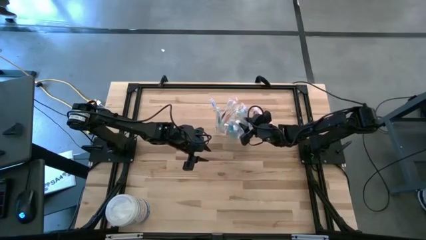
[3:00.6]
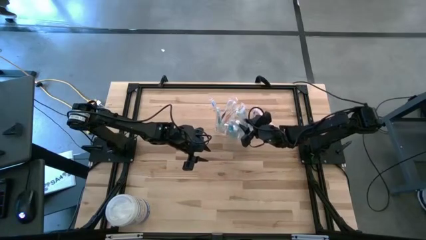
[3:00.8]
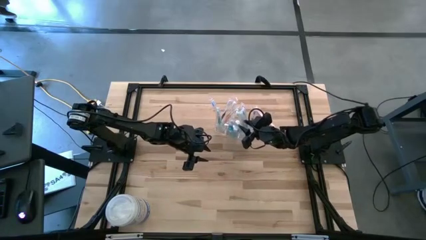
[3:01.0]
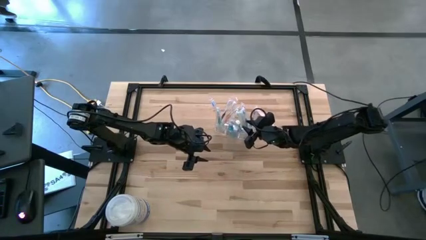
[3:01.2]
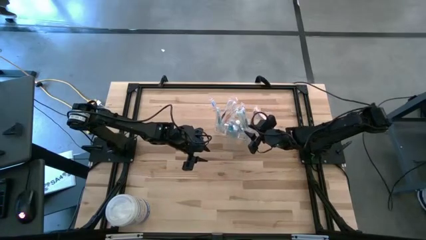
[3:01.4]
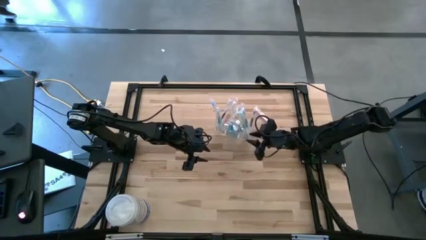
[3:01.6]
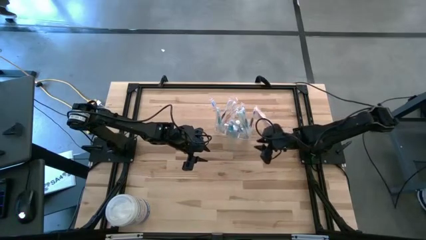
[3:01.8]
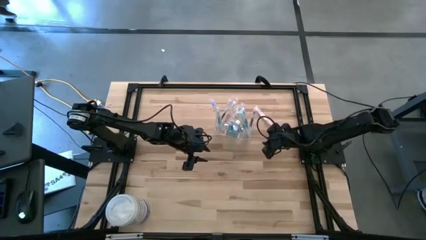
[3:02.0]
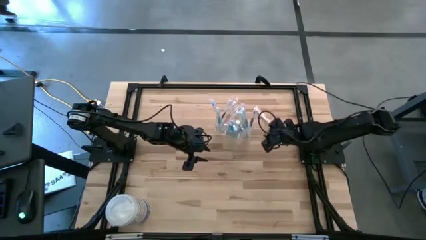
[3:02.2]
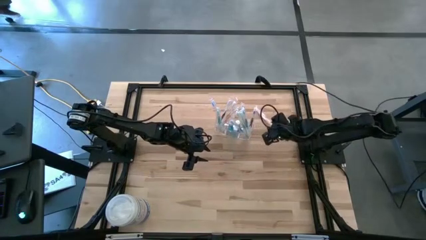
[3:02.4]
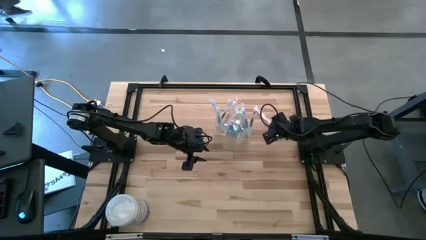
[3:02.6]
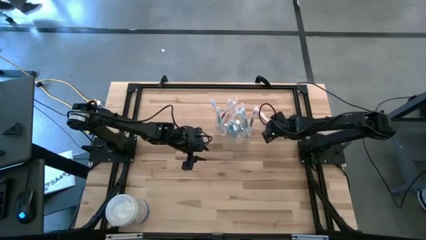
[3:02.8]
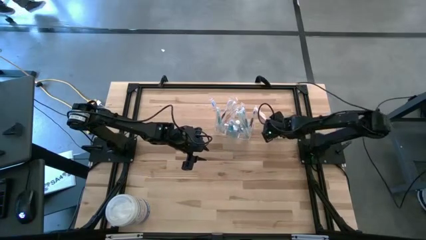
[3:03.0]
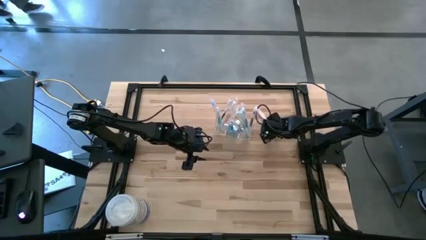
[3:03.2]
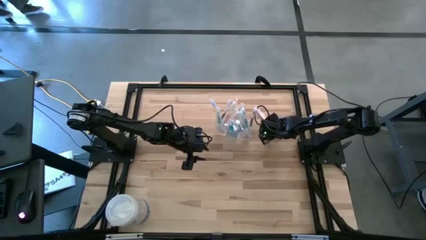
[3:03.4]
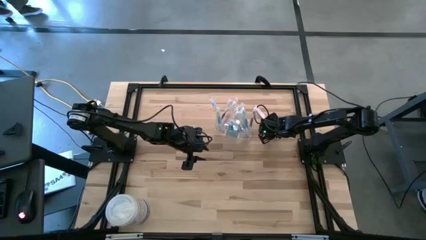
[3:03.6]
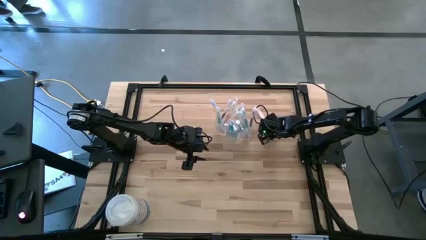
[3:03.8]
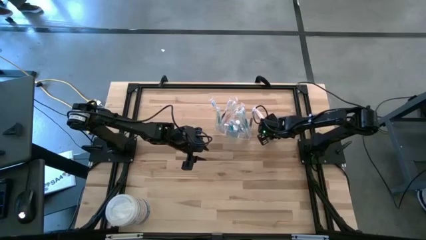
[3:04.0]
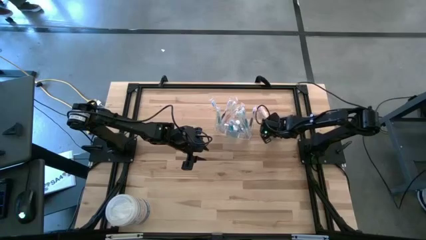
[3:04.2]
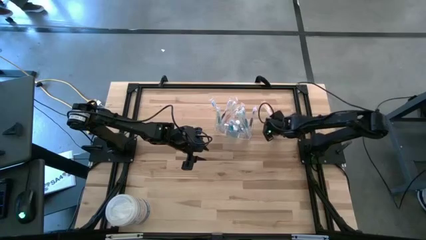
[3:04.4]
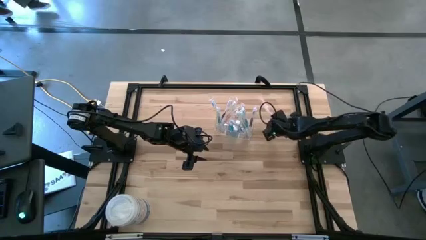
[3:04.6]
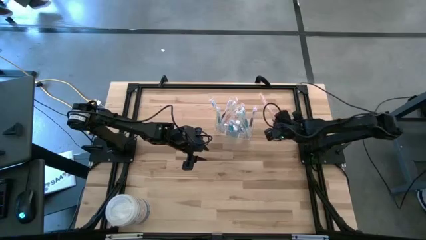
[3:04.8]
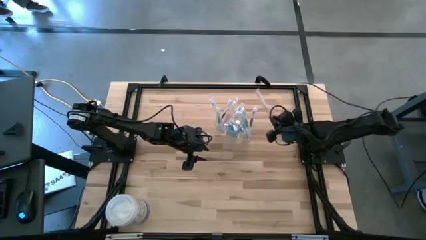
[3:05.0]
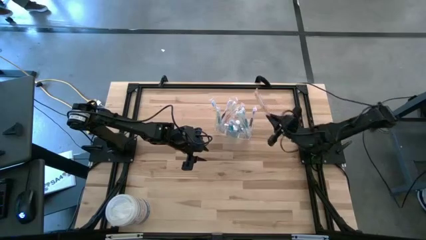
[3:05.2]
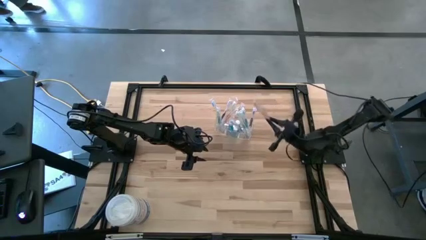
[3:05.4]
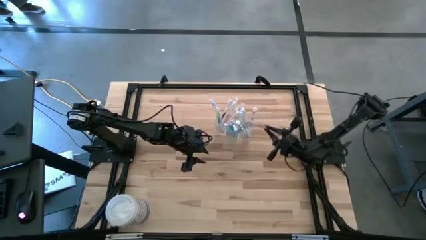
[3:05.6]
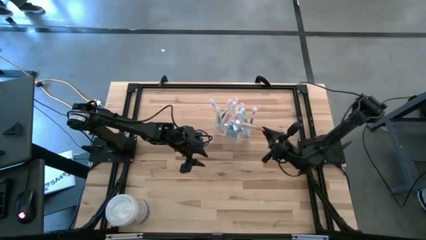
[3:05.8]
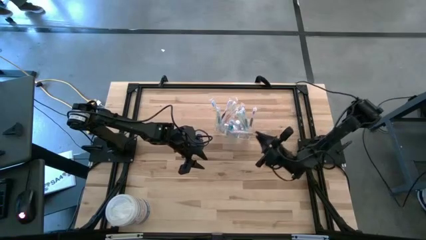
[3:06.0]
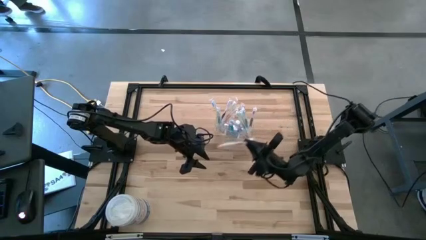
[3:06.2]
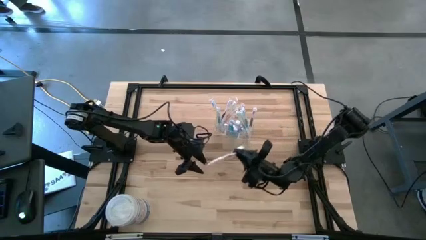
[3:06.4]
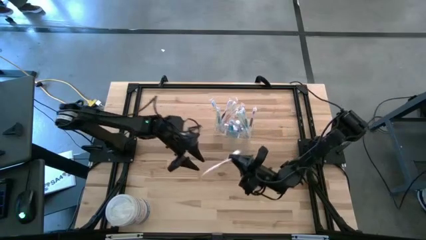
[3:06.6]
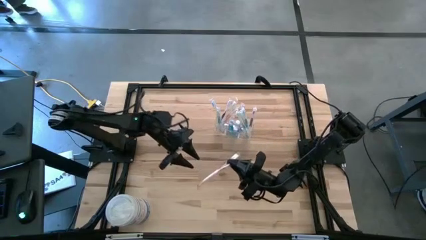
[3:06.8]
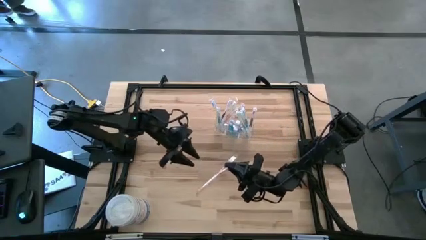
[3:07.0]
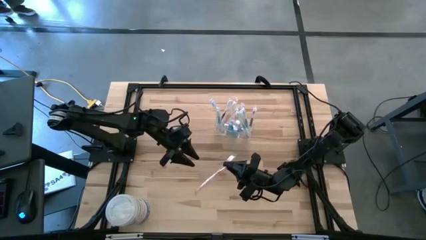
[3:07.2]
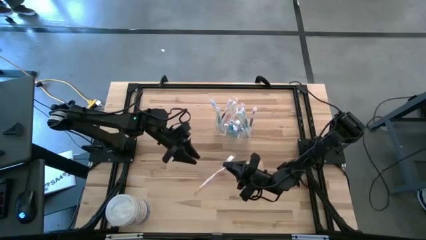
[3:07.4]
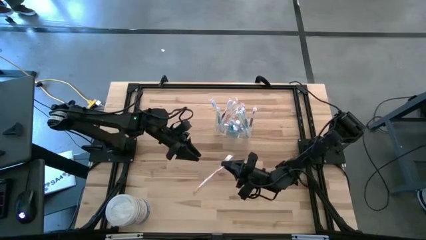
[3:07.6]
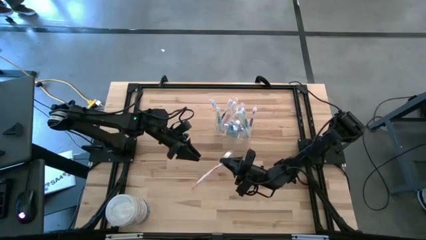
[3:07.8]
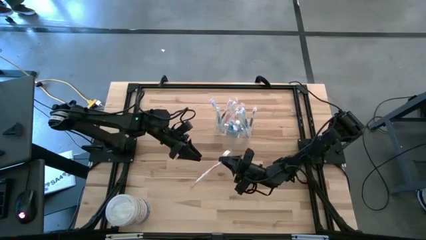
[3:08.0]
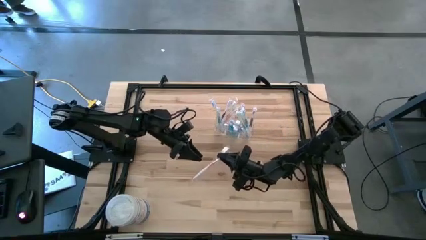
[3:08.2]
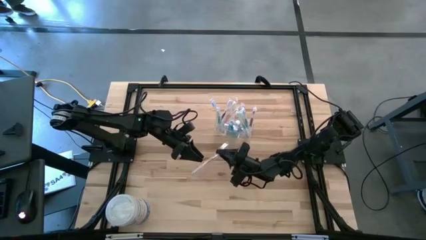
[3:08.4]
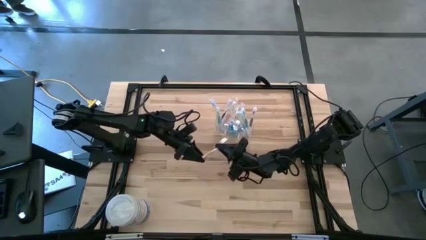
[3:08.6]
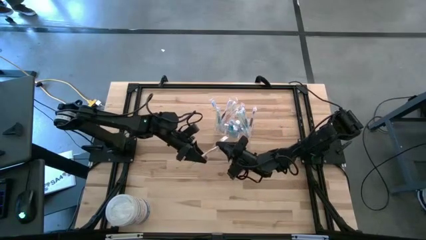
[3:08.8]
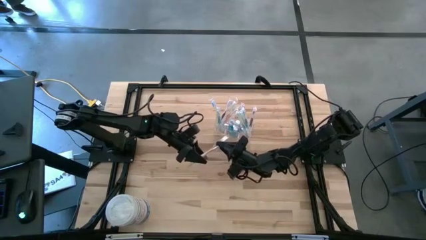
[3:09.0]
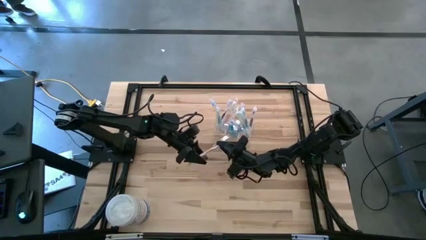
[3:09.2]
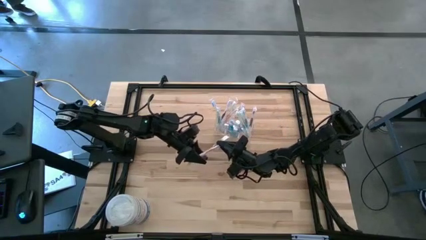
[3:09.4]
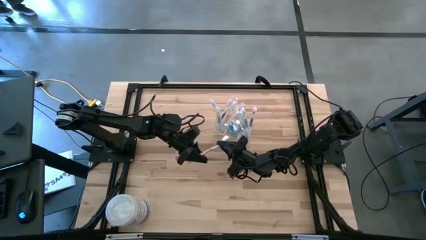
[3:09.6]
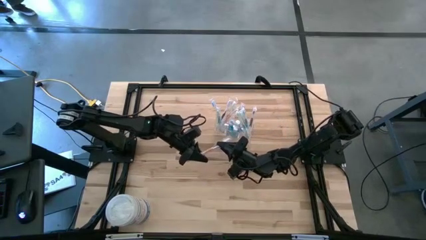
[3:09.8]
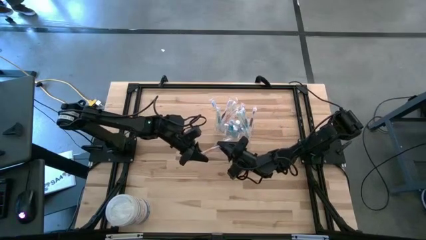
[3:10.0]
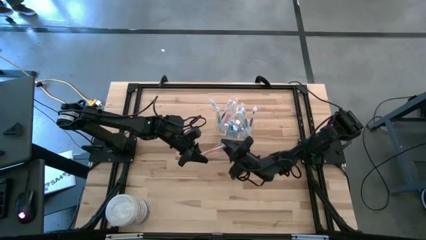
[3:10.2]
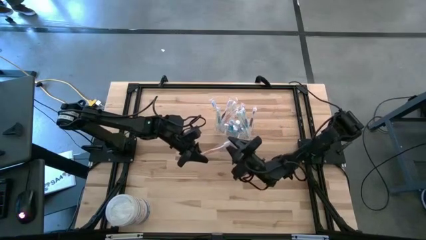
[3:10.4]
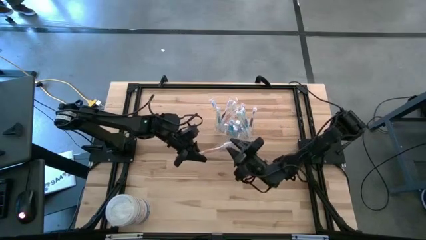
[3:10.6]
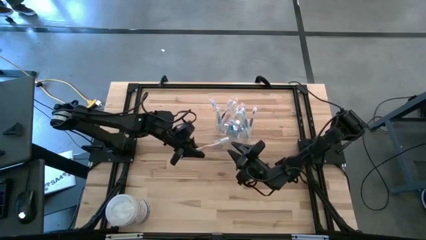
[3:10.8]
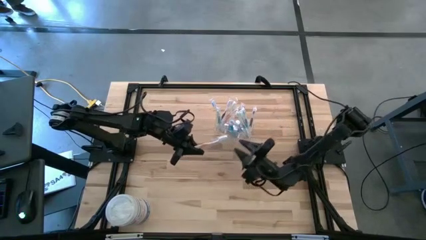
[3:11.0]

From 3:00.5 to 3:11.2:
Task: Pick & Place toothbrushing station
Put the orange toothbrush into the transparent organizer

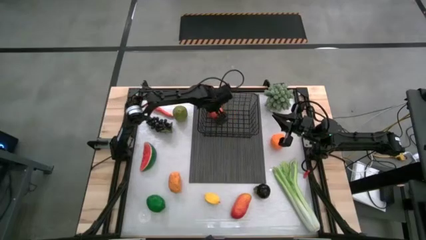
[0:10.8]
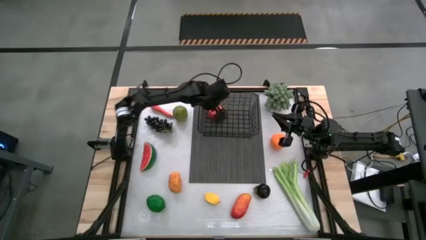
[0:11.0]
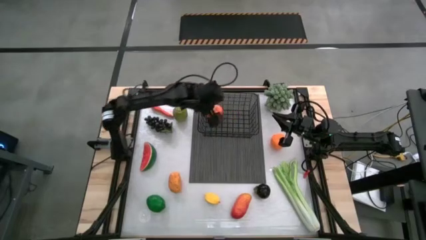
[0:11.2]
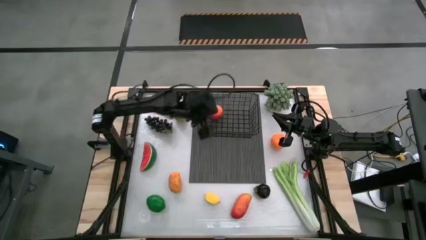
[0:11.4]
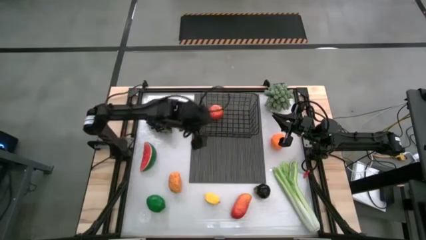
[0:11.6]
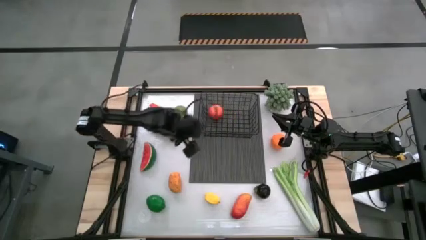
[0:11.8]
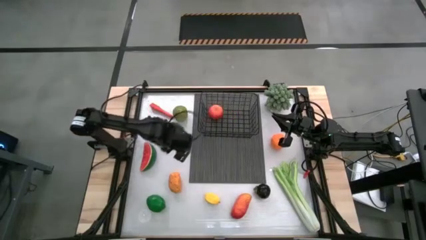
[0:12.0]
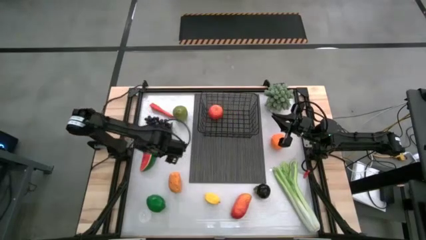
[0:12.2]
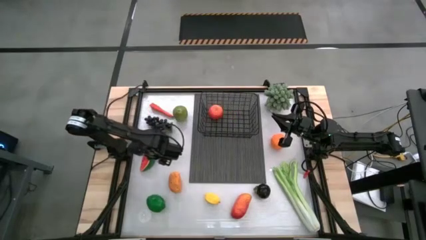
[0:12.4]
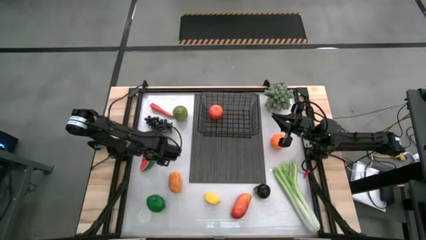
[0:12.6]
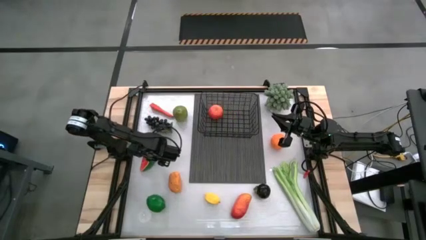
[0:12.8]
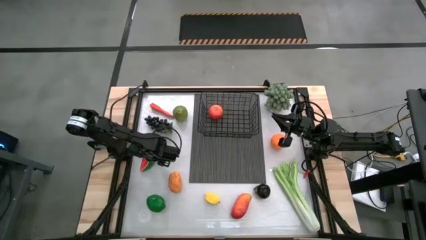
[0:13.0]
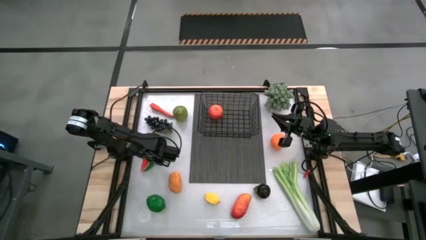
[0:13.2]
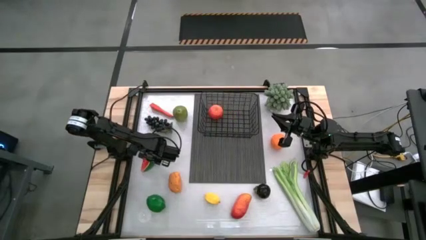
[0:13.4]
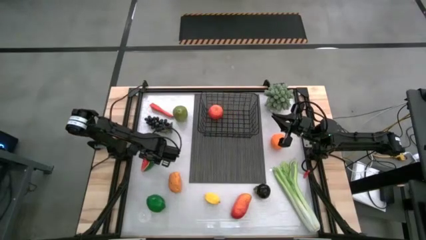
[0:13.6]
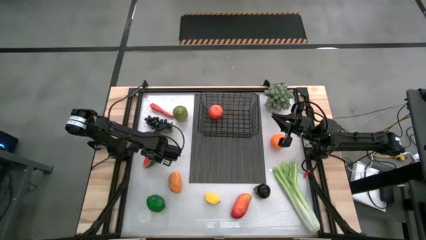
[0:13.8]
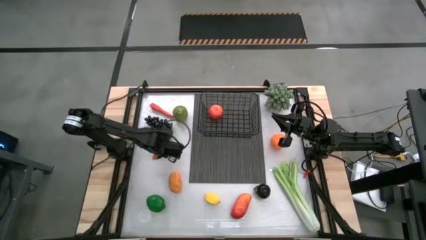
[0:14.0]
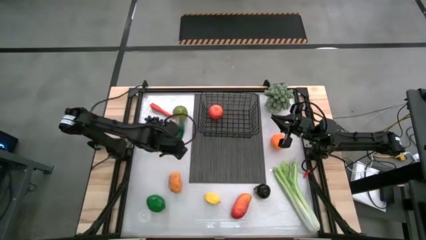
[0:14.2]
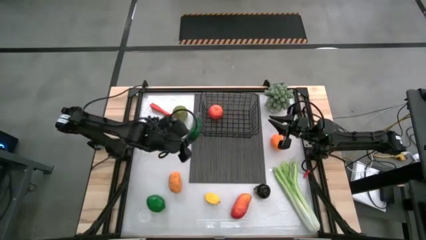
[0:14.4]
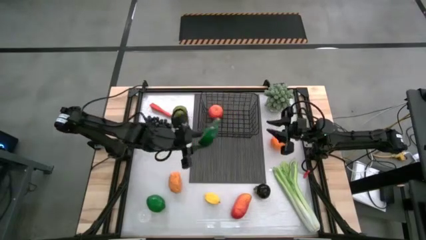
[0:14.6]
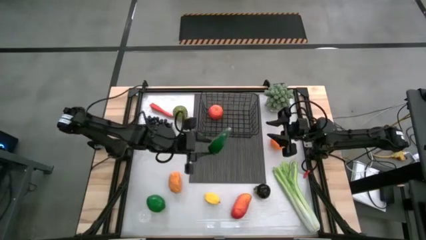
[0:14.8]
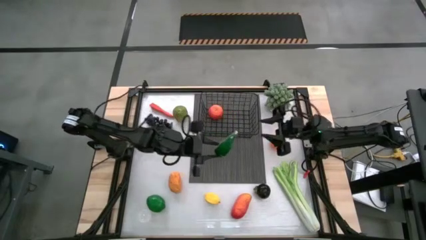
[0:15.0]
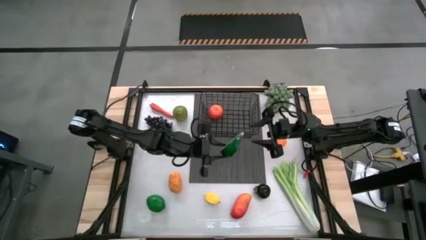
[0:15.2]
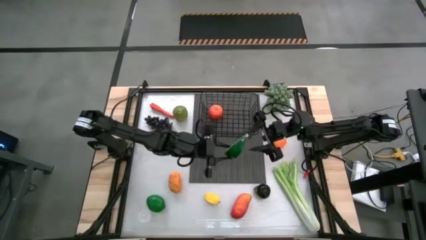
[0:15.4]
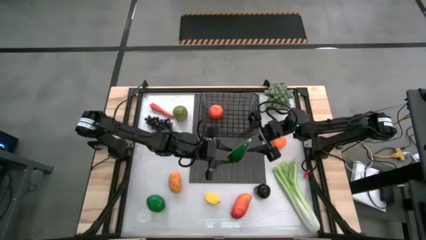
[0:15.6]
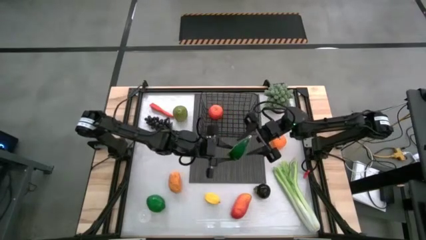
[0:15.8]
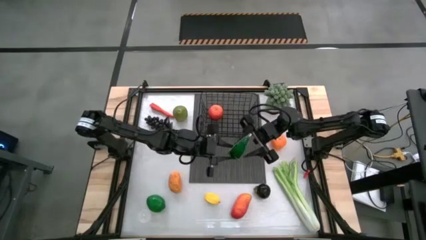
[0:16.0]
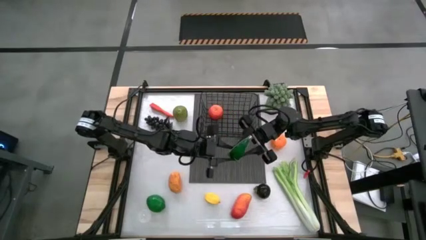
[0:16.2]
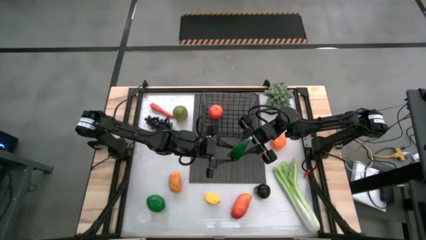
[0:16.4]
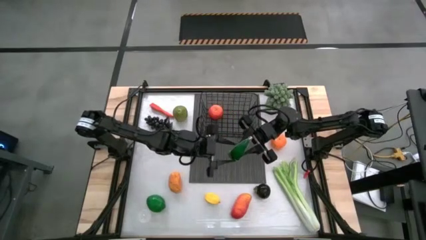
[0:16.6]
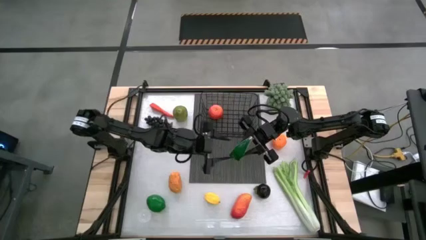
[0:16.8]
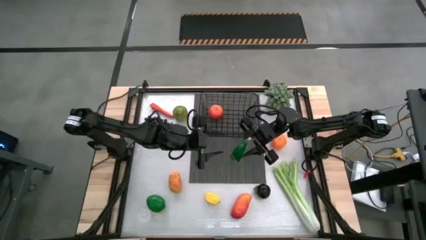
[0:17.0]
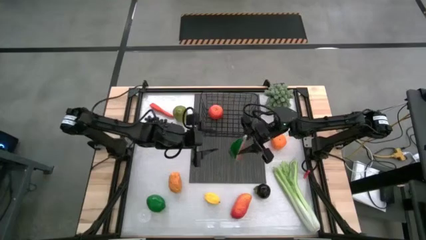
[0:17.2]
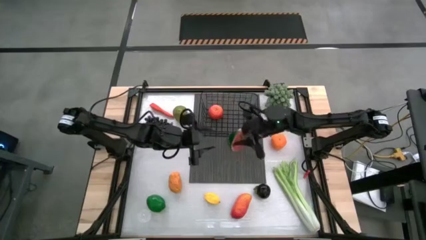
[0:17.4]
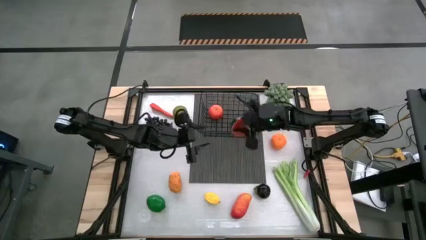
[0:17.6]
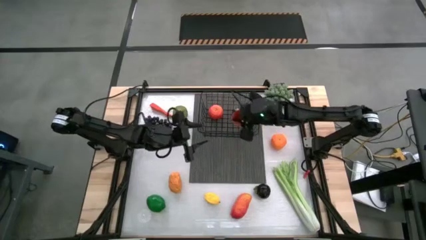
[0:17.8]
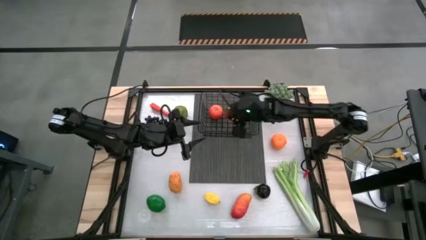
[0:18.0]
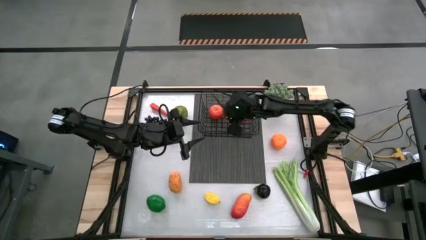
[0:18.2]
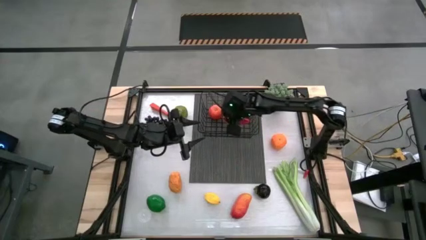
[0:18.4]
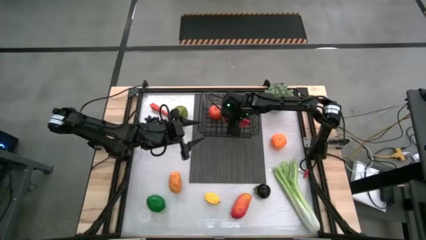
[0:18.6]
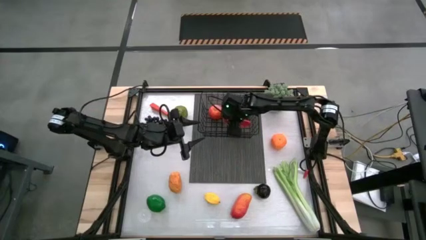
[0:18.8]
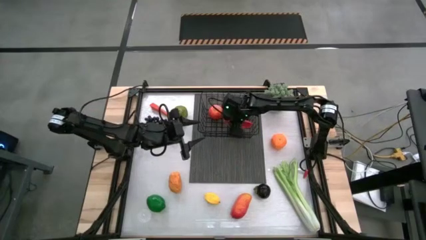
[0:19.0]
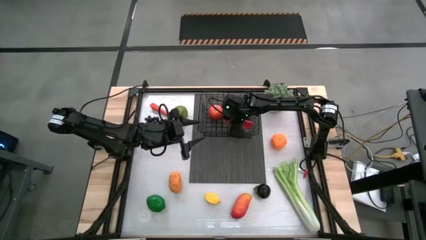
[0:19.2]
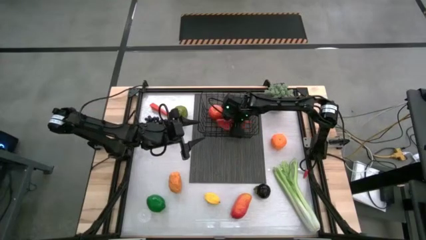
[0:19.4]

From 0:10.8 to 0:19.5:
Task: Build produce basket
Put the watermelon into the wire basket
